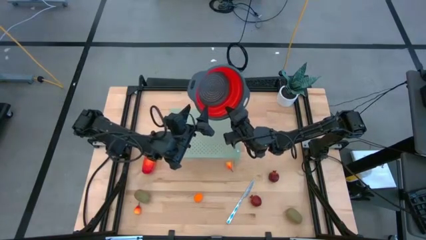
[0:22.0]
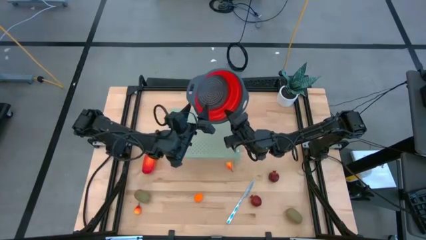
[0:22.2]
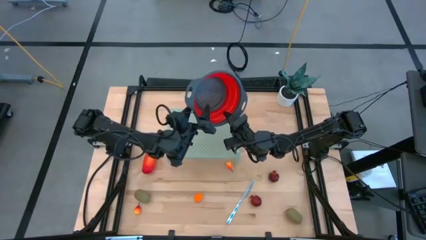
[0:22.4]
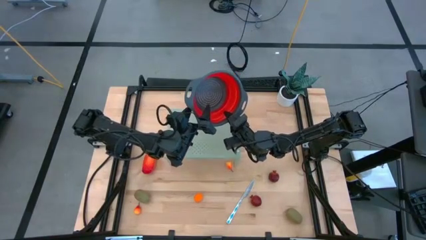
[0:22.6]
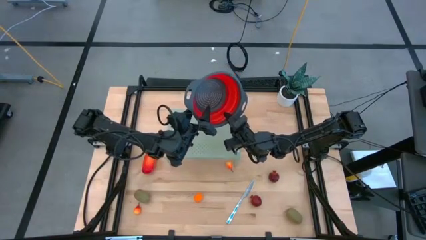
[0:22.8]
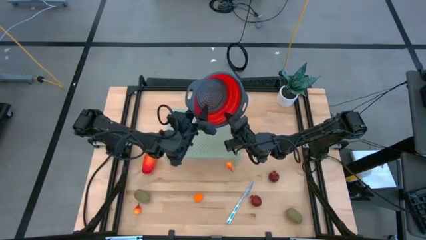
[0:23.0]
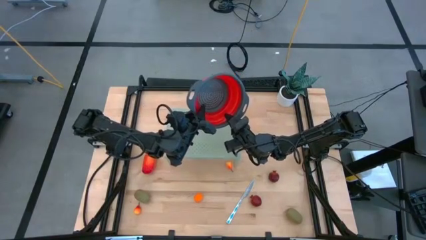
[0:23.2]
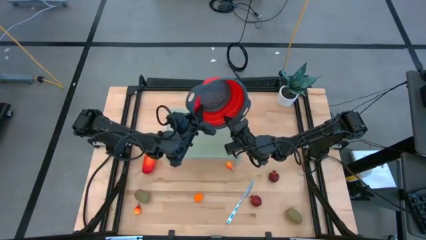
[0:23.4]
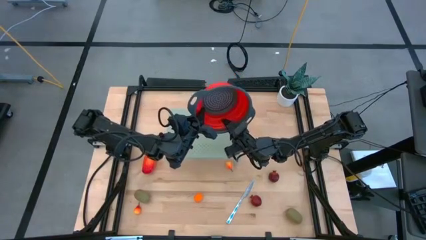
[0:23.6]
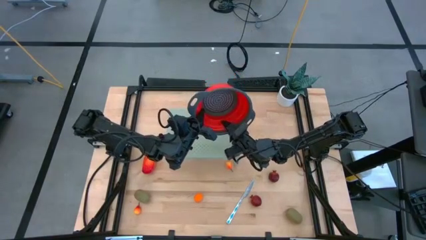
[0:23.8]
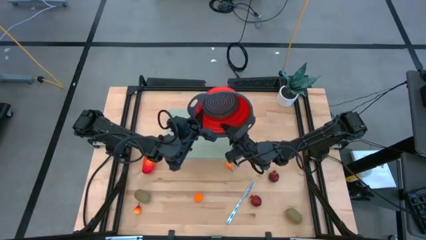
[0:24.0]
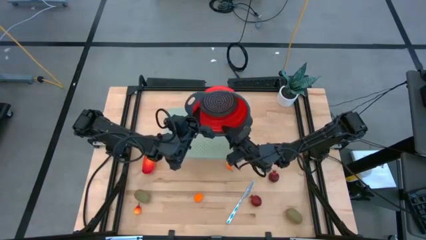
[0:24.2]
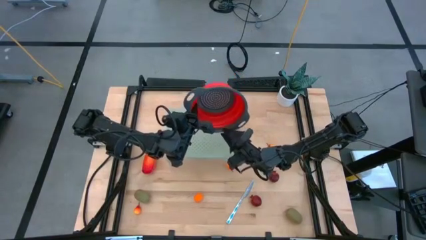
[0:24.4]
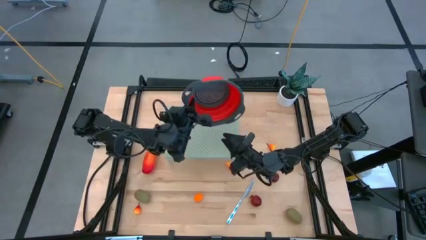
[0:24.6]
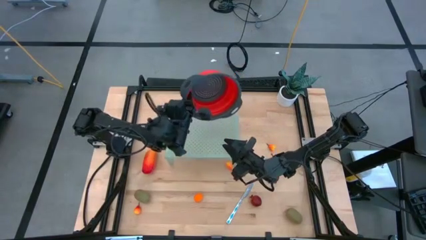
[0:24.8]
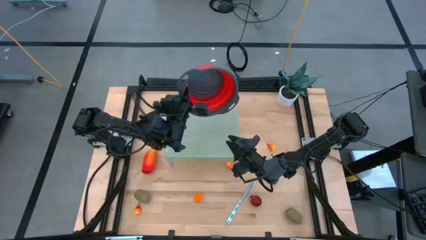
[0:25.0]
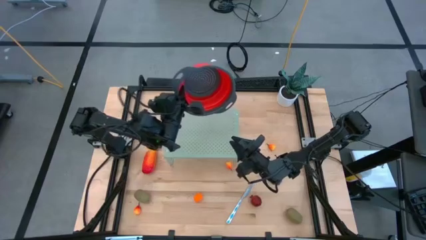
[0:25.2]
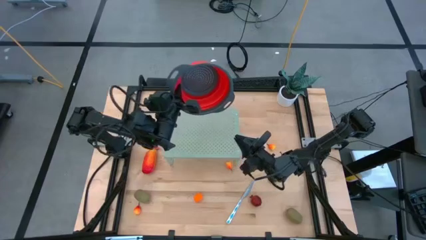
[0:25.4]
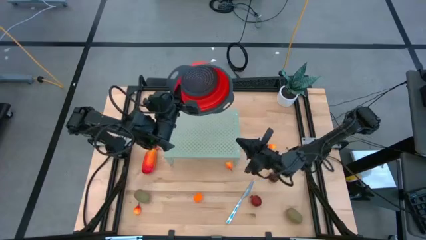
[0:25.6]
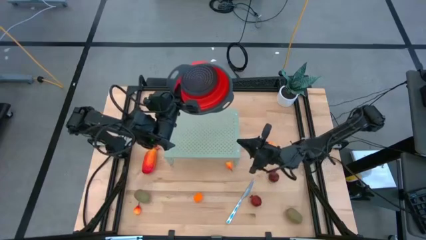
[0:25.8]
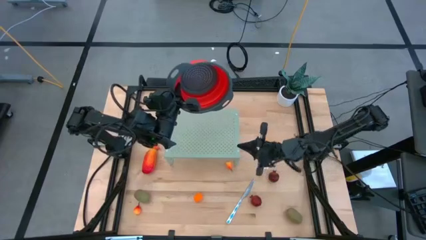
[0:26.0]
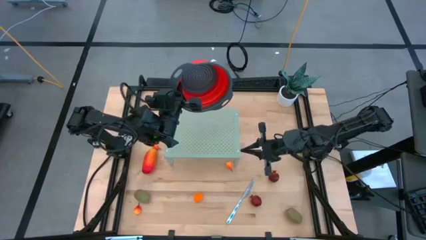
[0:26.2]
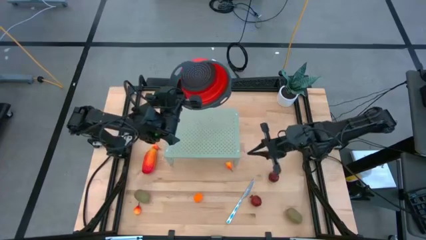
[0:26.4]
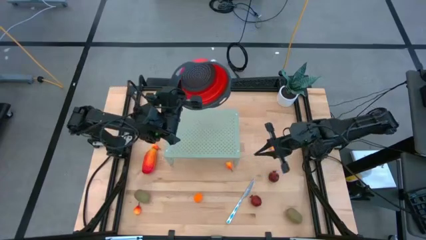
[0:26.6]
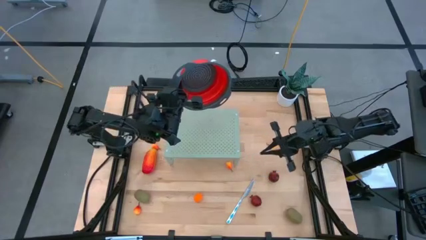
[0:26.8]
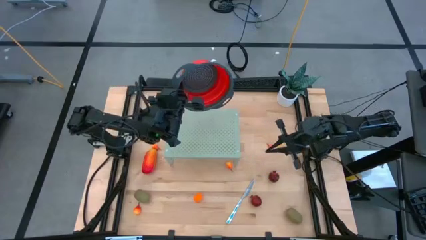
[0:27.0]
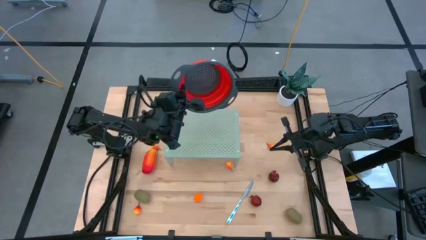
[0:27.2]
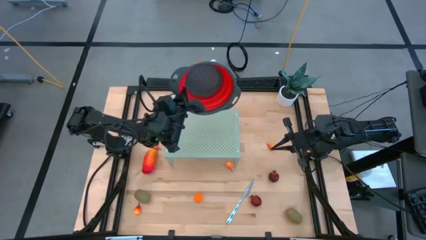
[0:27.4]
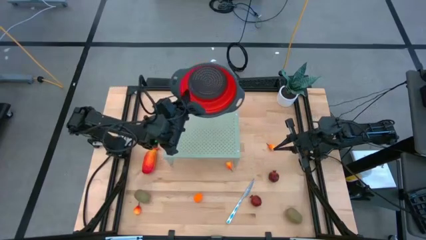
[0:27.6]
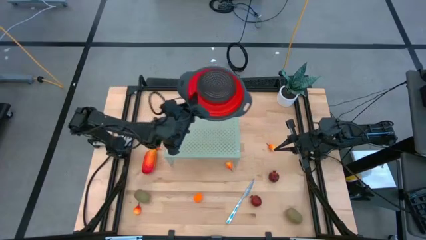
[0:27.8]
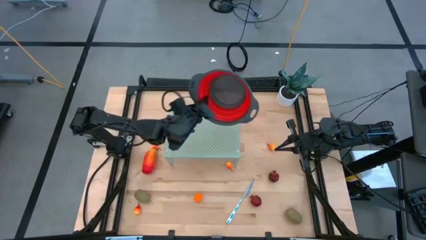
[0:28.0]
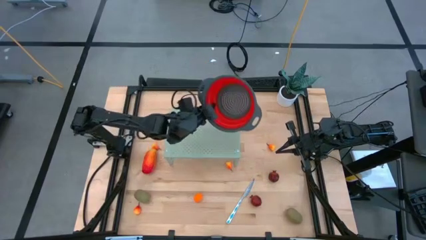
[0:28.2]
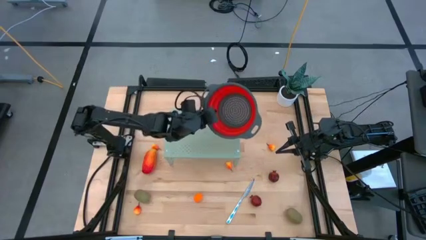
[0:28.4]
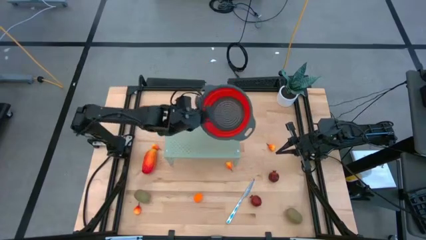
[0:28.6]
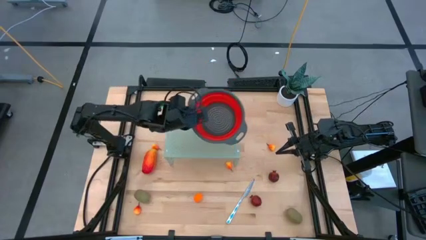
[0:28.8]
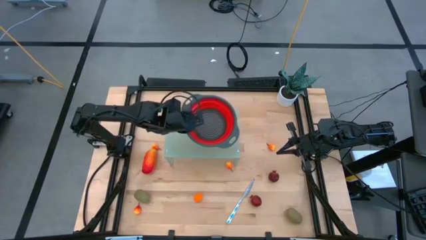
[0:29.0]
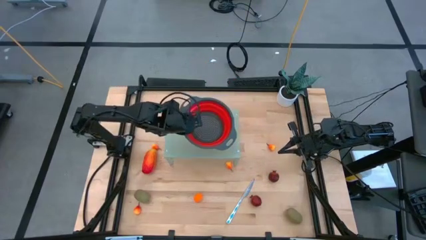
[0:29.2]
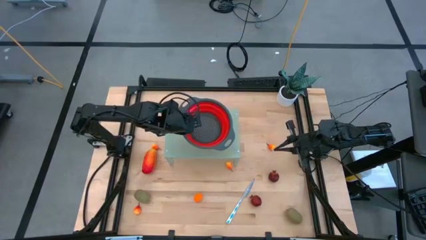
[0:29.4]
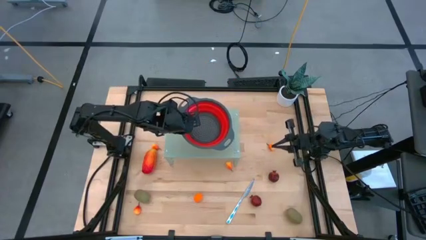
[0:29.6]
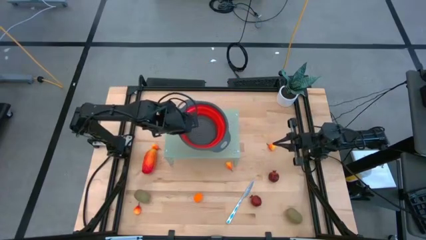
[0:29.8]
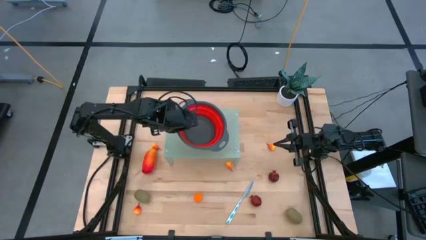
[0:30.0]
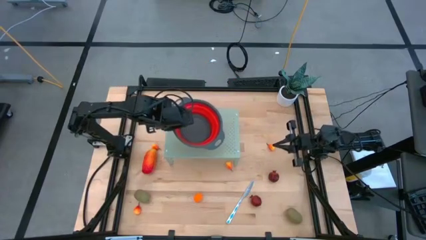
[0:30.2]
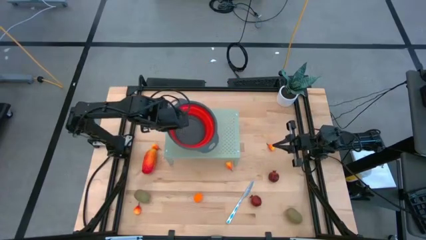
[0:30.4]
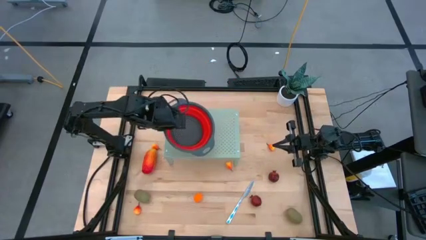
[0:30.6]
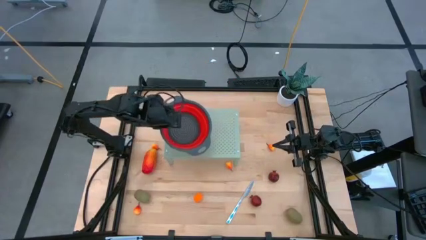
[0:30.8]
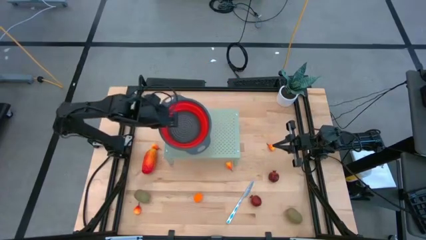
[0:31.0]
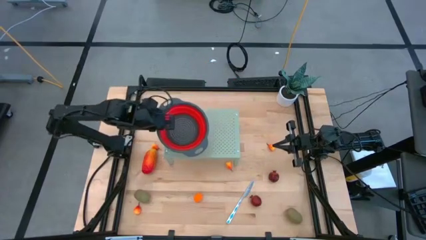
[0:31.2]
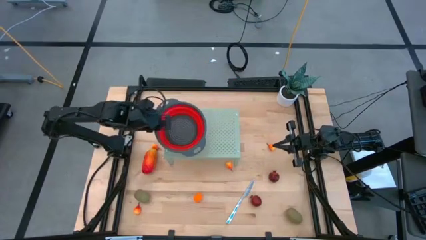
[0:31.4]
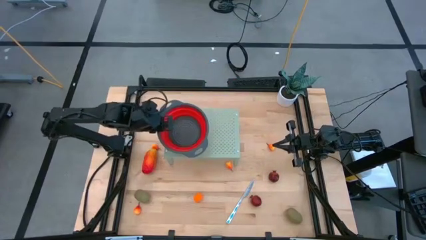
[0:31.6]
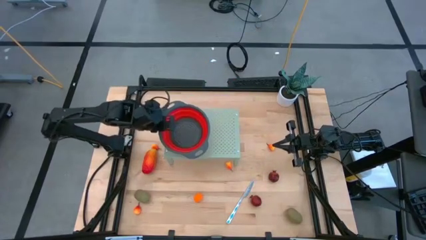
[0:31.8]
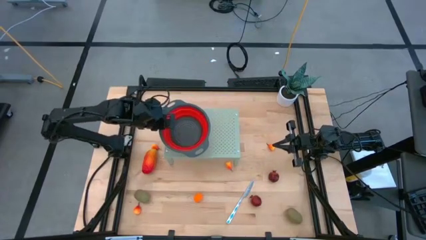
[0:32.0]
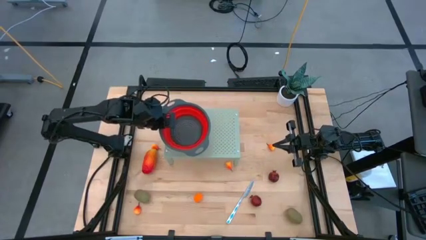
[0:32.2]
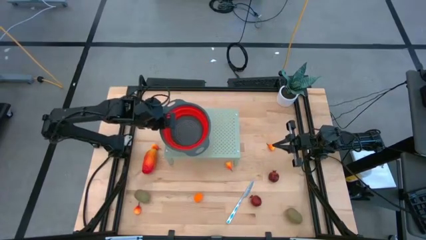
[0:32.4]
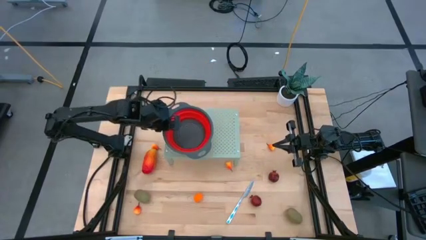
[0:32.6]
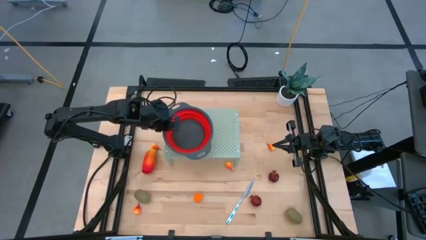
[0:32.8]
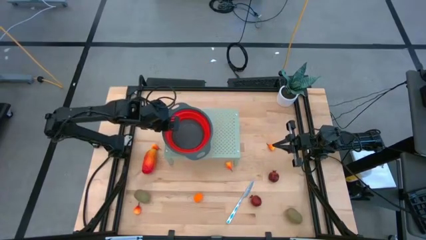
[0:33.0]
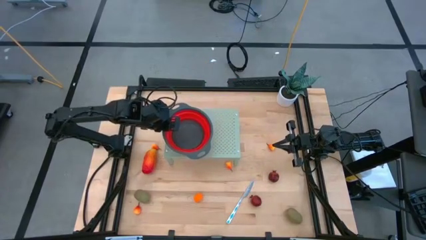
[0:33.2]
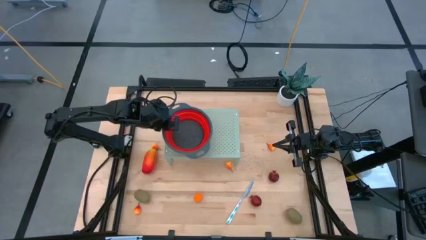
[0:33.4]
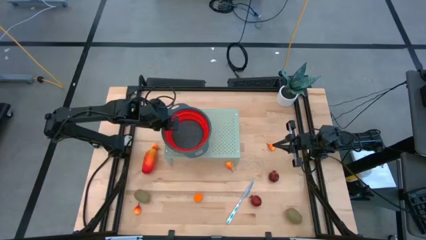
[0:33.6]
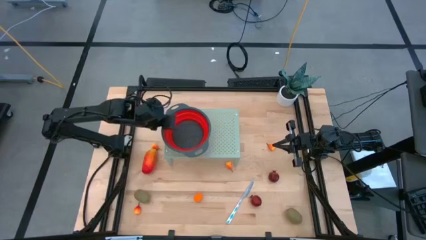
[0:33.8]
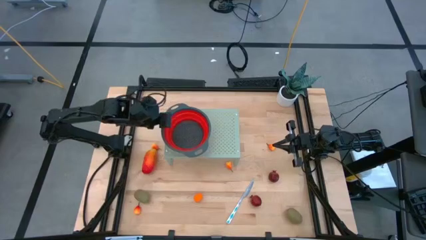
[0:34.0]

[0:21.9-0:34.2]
Task: Pick & Place Fruit
Put the red strainer bowl on the shelf

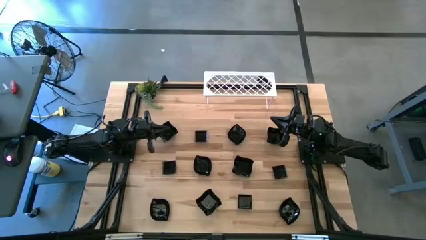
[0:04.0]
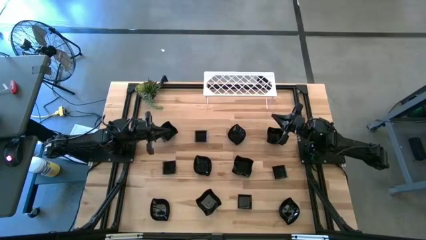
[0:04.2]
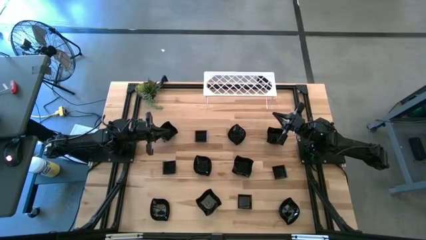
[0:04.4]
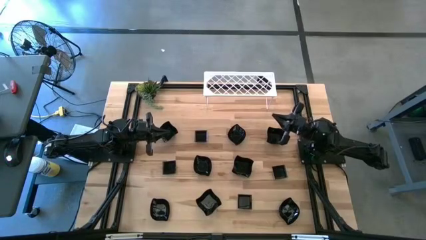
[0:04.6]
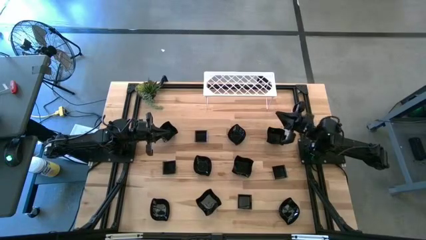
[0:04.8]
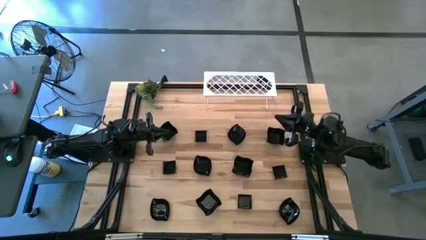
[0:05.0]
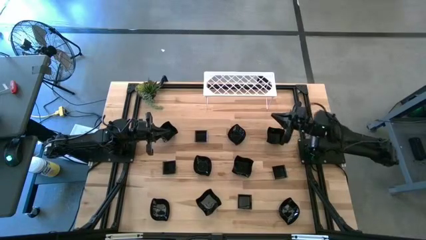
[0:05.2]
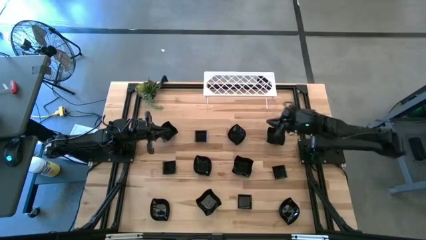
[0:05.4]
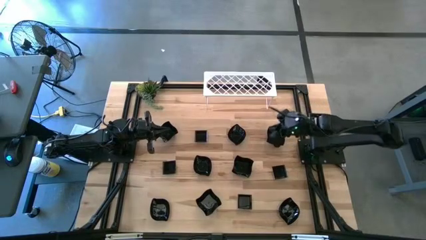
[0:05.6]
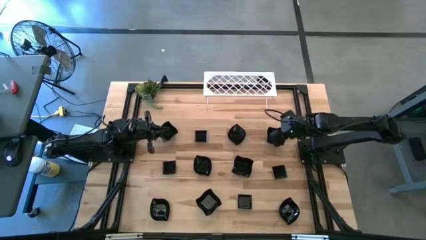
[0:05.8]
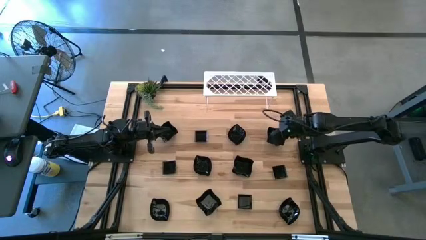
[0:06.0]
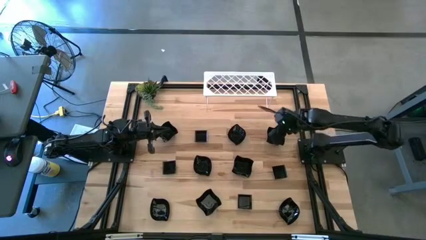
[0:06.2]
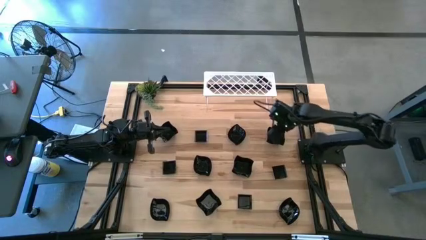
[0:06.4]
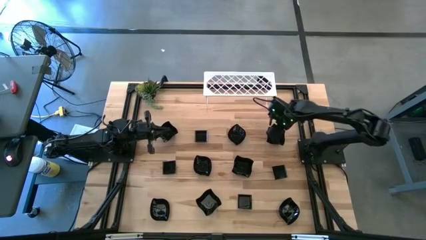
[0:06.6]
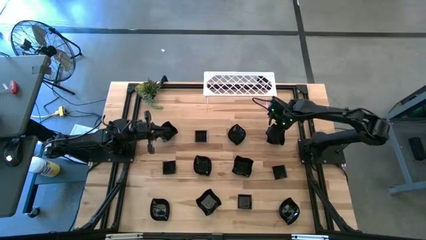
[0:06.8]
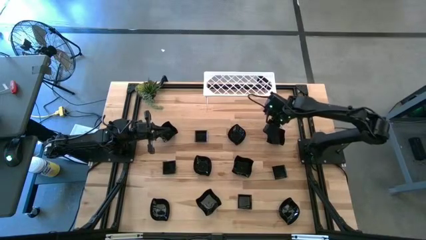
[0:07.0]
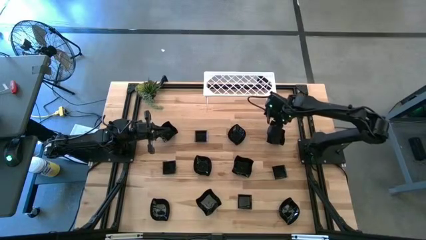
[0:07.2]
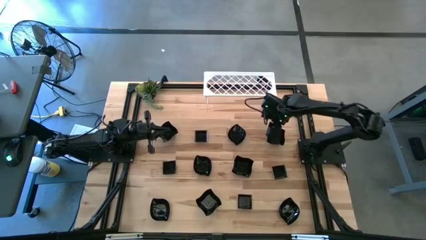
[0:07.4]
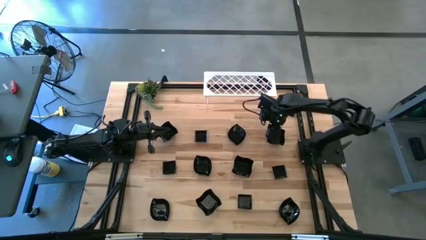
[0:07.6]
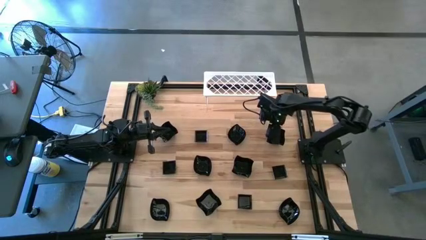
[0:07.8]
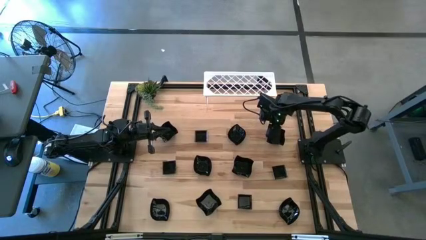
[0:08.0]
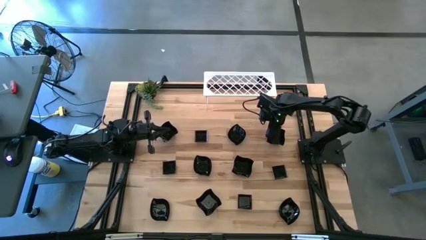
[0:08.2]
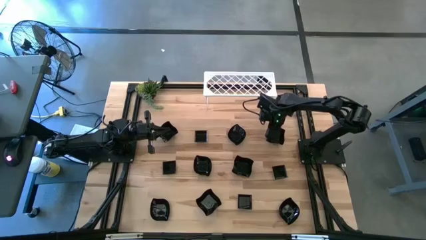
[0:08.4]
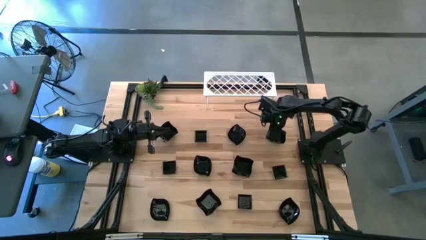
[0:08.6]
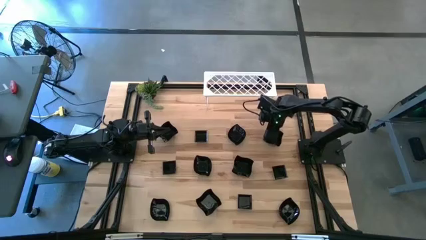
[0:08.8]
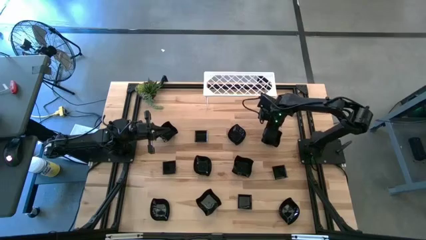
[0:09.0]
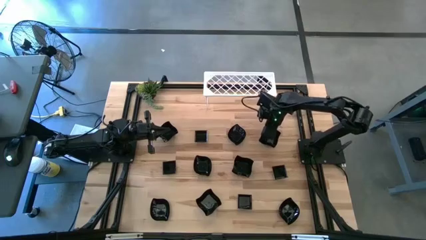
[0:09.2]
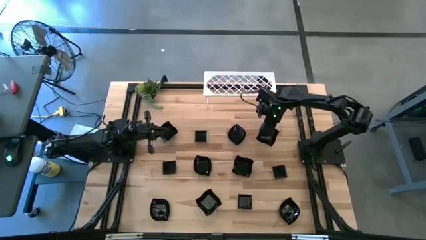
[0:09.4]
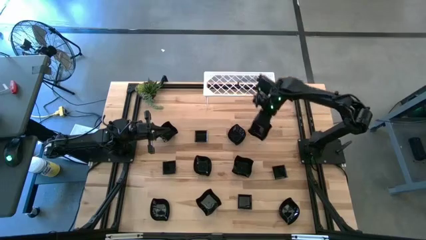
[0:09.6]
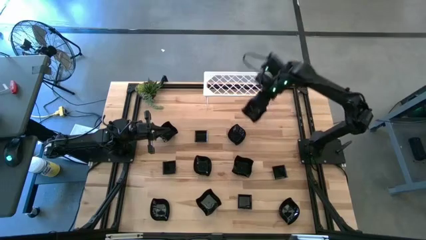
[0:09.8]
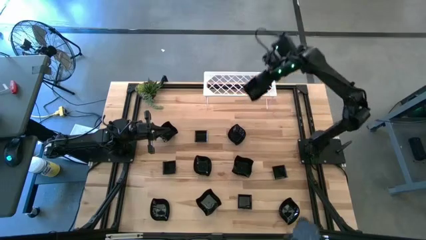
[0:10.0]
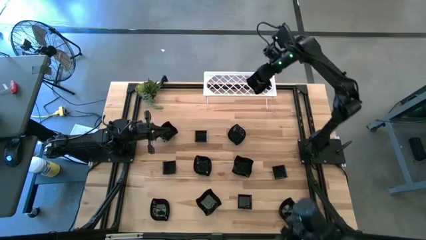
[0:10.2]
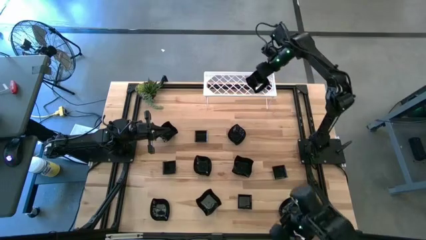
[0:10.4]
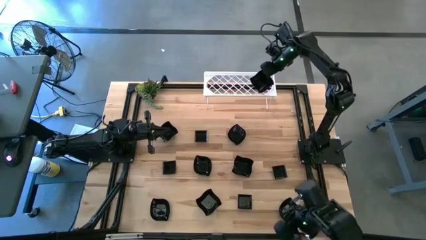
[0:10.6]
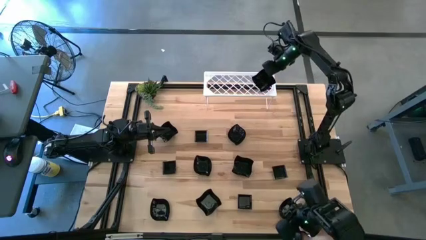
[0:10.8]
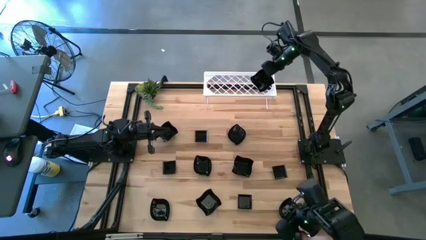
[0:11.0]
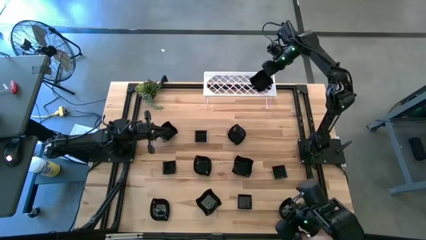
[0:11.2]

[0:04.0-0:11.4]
Task: Pick & Place Mini shaped plates
Put the distorted square plate on the shelf
